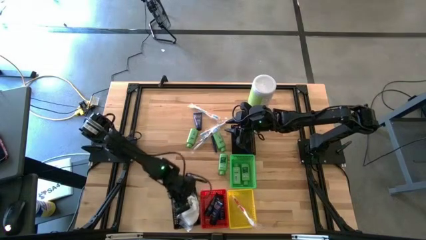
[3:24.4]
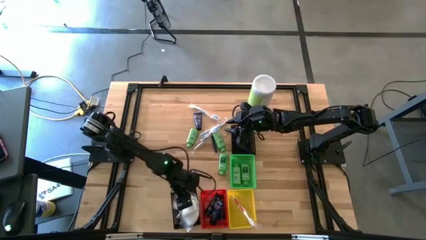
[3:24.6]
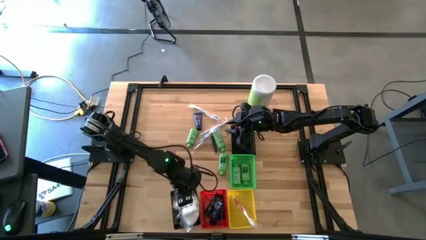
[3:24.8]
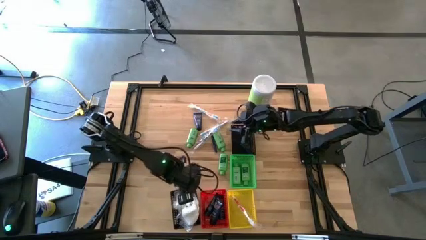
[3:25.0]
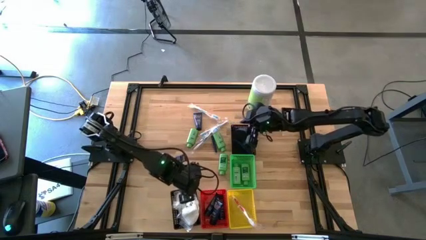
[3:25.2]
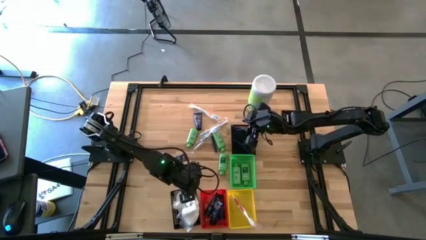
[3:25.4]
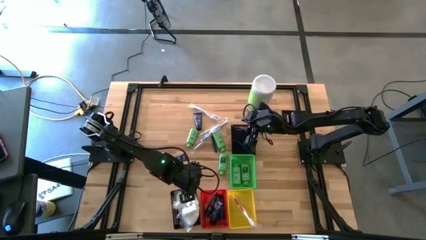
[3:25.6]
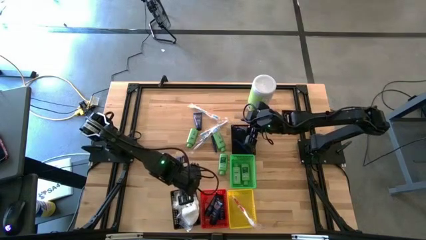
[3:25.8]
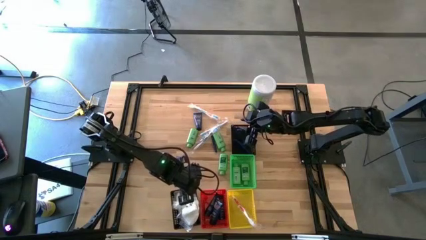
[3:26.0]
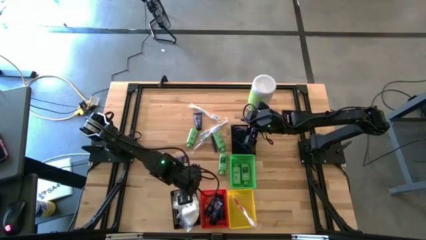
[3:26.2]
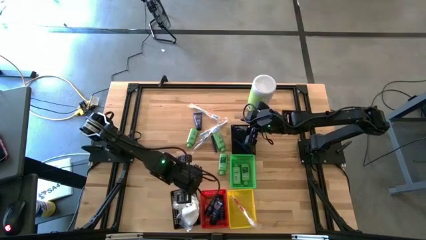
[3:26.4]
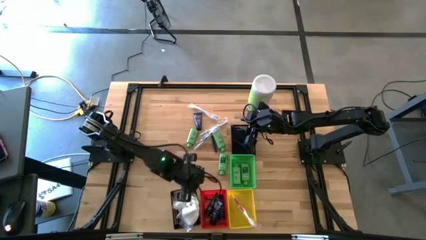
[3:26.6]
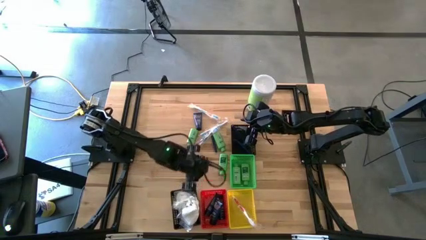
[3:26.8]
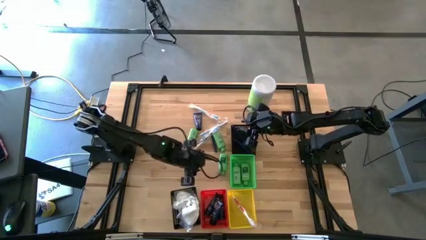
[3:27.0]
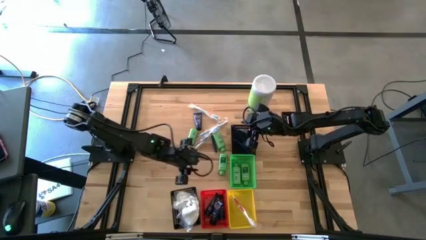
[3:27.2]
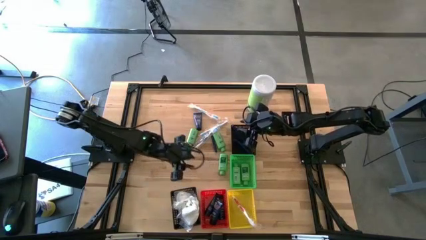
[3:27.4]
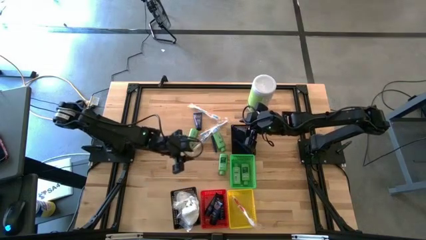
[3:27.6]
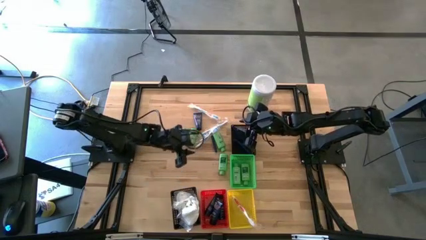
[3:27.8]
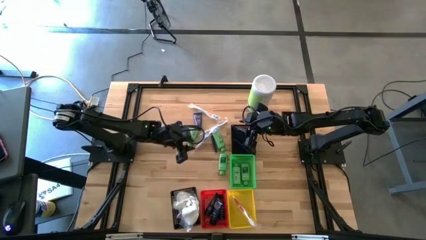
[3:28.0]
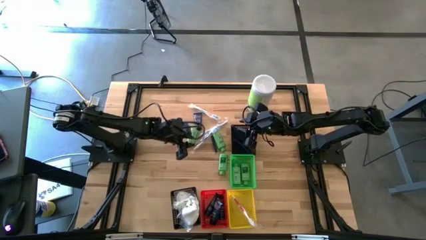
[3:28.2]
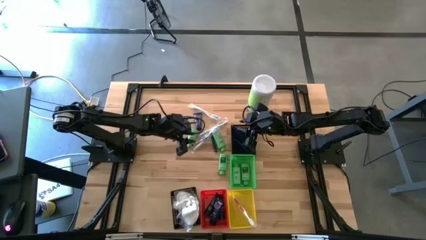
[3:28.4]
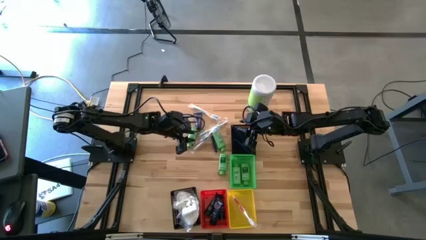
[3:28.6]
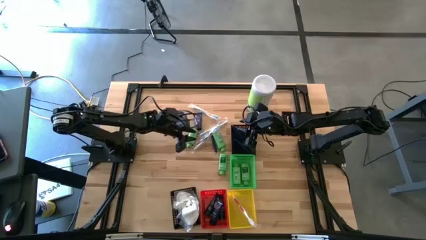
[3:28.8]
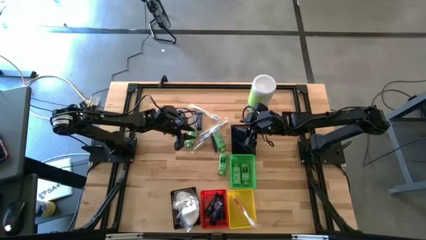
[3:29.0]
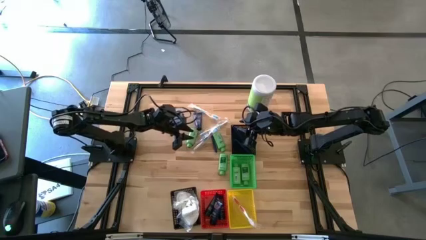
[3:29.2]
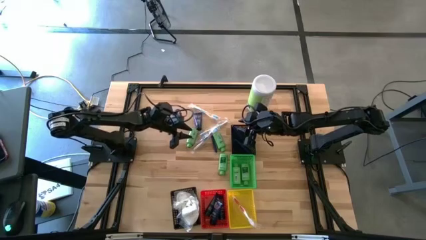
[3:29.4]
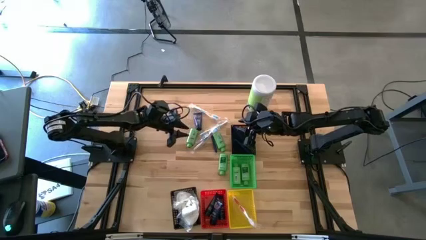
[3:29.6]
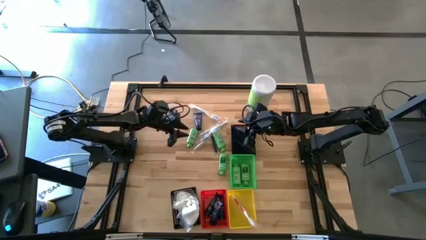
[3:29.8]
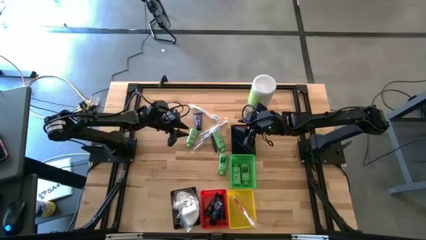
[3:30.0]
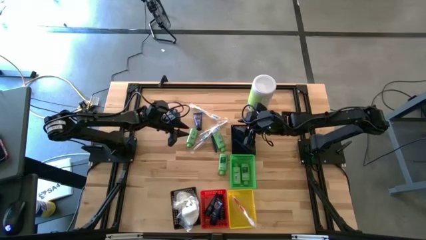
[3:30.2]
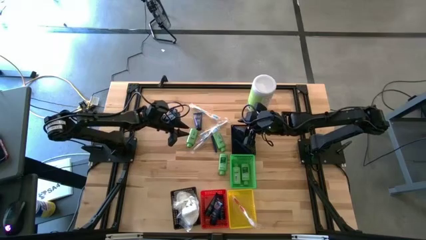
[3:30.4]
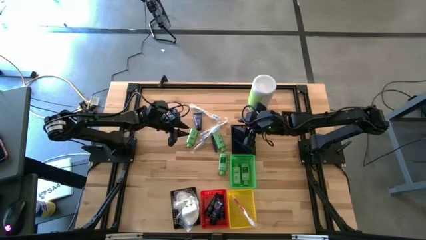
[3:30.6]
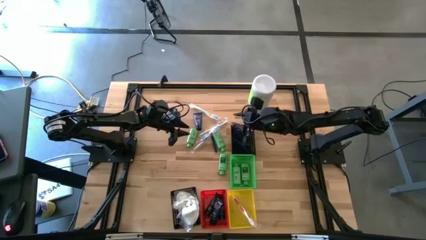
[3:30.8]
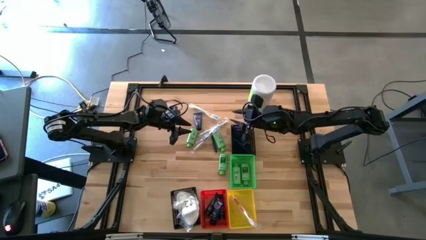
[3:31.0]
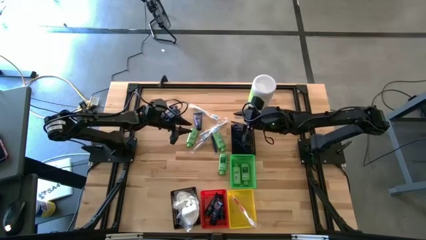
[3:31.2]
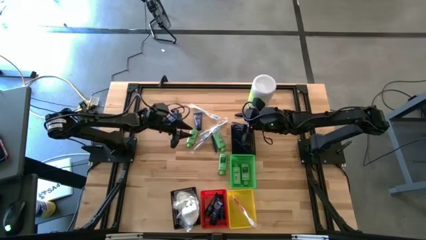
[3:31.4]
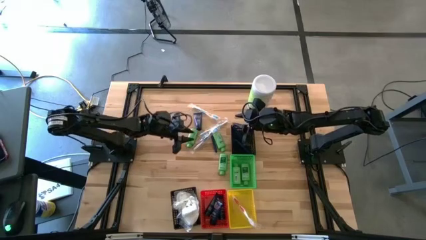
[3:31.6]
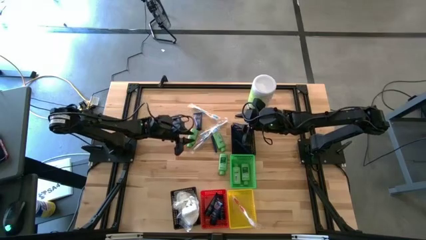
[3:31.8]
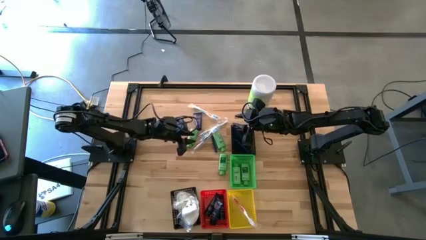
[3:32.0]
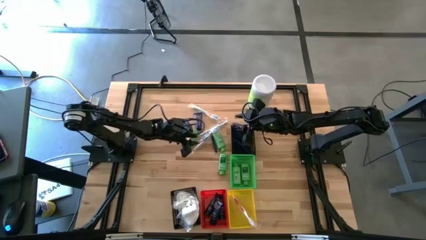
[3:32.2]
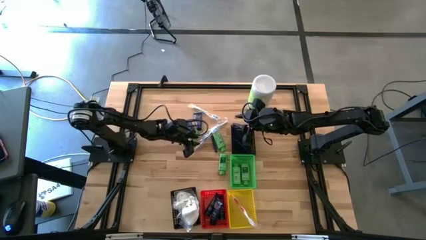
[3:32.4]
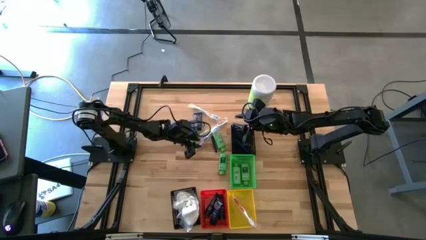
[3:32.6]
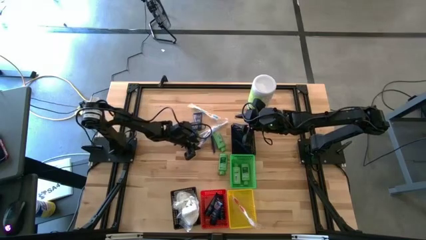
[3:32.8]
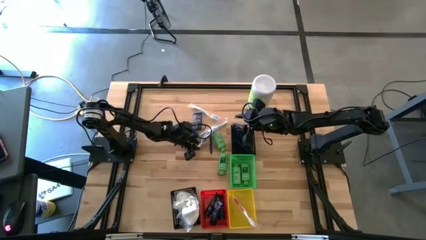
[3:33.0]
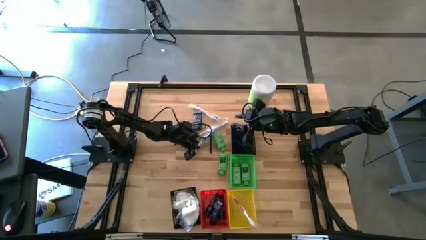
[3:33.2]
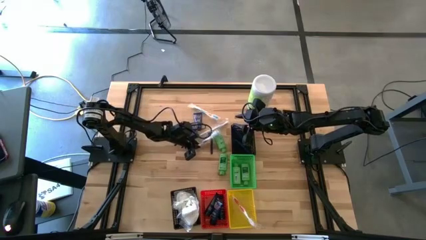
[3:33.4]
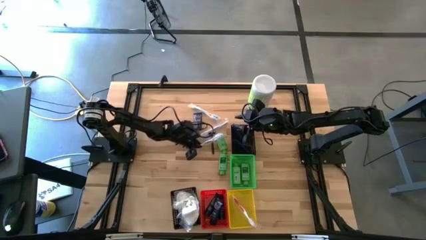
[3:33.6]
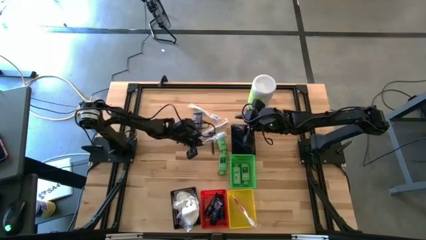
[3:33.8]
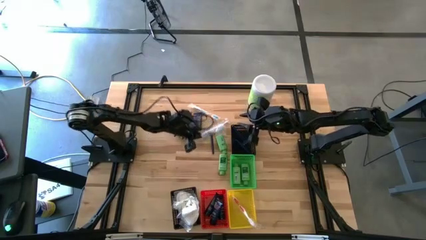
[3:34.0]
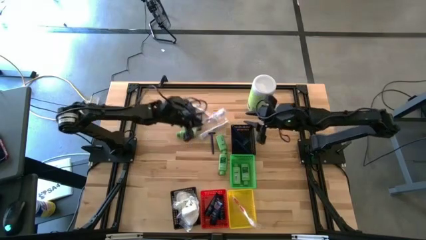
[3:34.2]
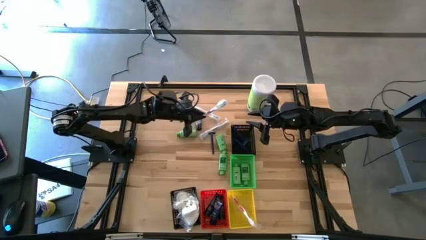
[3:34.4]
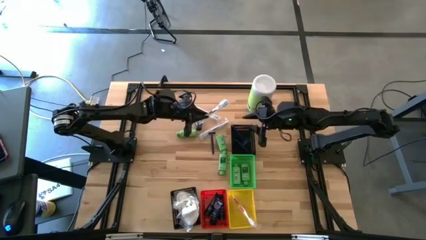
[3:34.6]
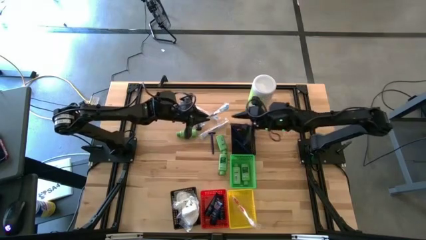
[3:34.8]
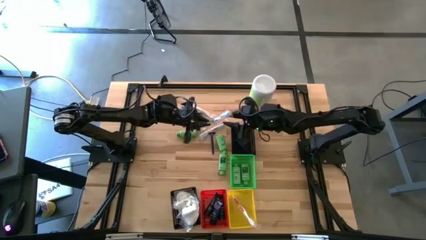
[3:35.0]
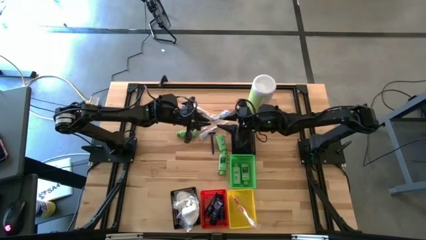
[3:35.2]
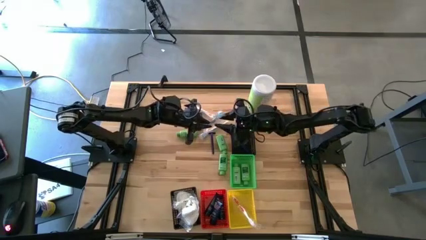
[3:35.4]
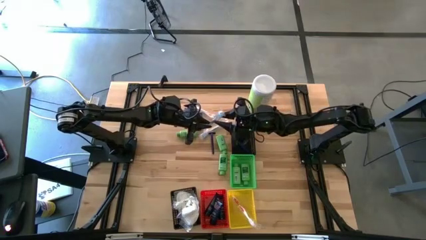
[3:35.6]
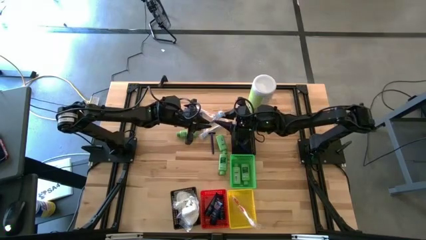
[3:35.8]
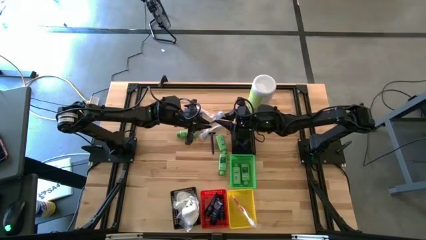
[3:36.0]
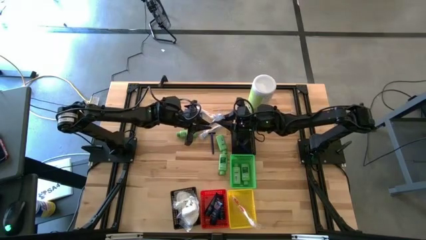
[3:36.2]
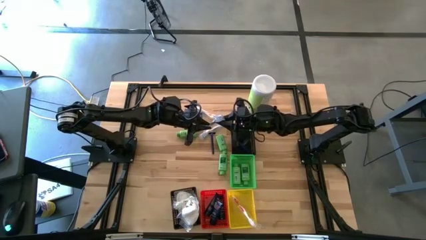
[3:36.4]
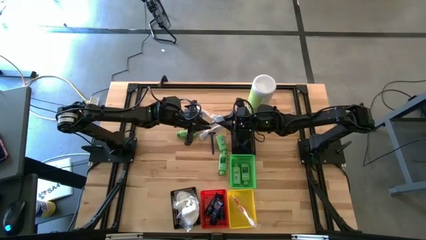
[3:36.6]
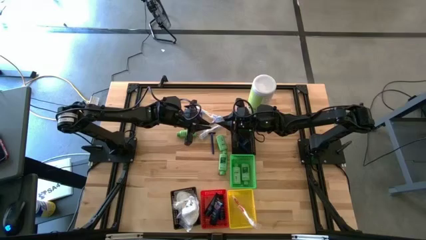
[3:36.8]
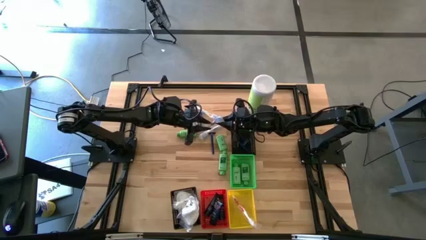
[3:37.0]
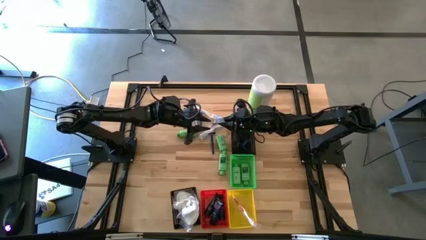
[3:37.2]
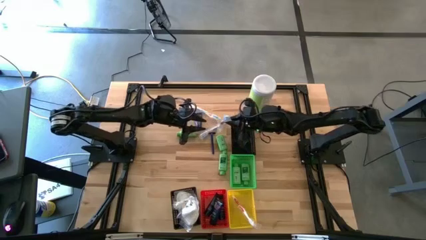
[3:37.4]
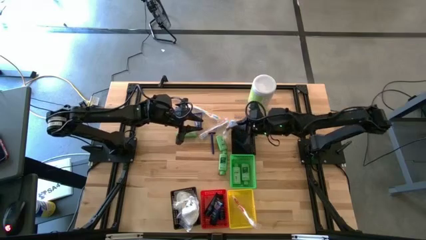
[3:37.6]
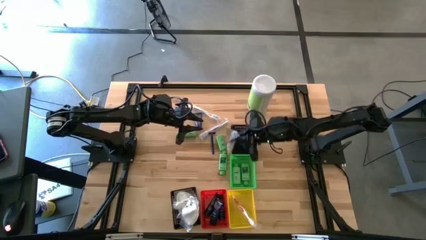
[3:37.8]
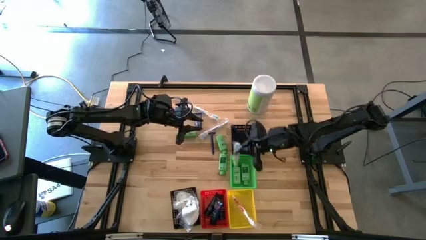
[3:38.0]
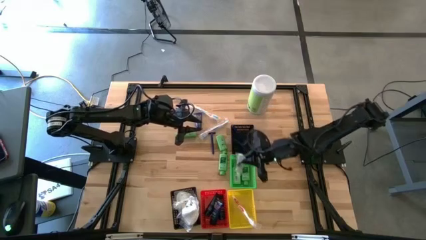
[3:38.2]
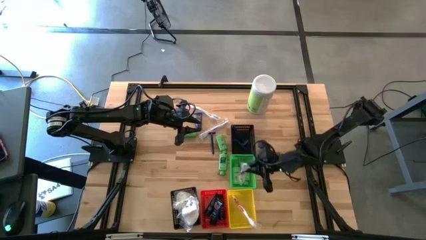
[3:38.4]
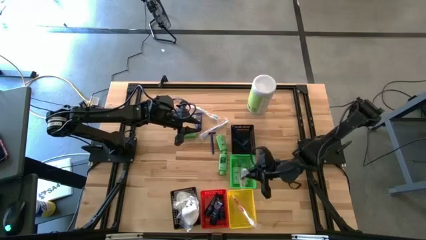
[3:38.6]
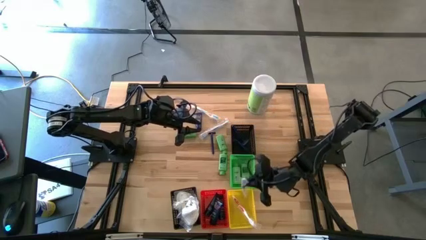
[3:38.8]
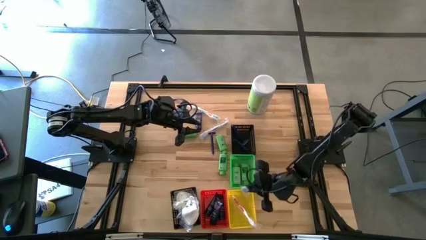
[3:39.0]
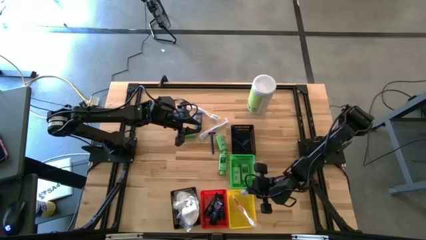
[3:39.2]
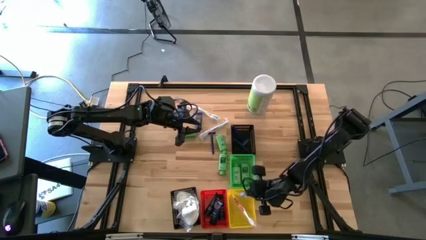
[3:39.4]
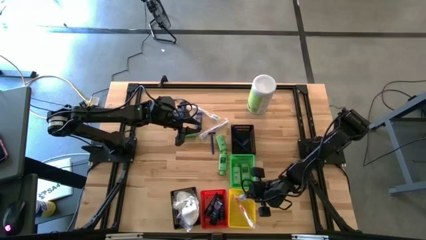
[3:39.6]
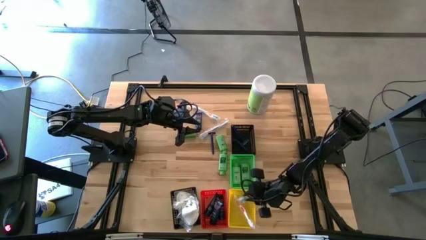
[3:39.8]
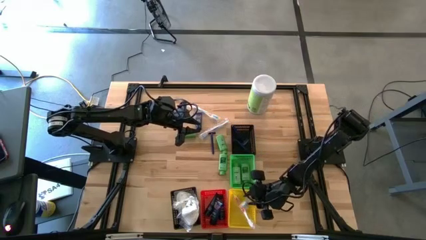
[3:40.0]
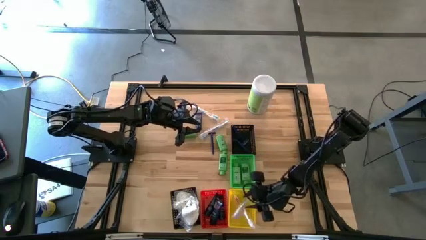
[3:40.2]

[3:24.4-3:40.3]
Task: Pick & Place Travel size toiletries
Put the blue toothbrush into the yellow bin

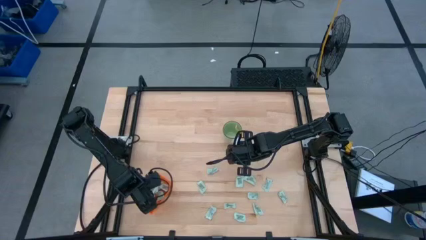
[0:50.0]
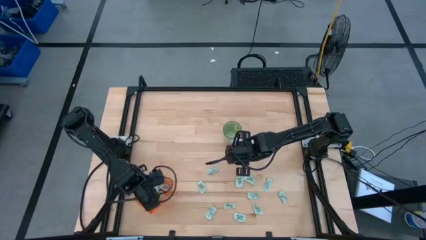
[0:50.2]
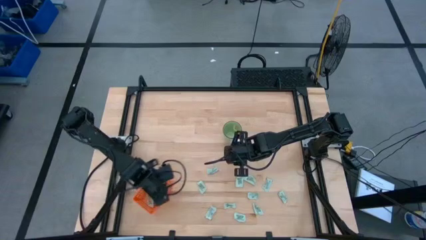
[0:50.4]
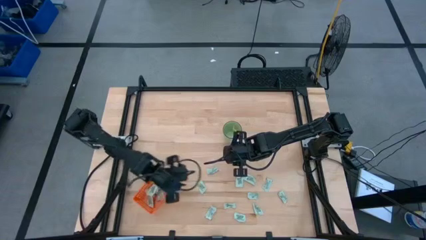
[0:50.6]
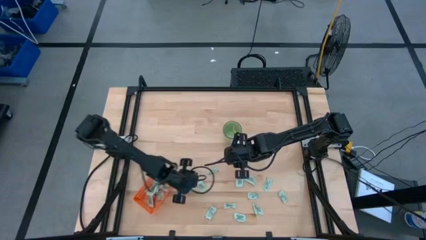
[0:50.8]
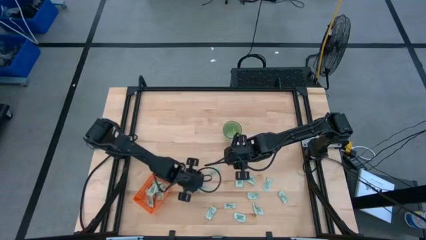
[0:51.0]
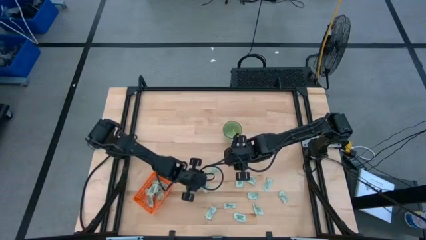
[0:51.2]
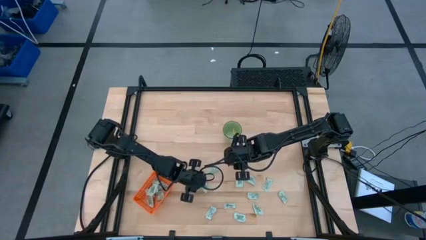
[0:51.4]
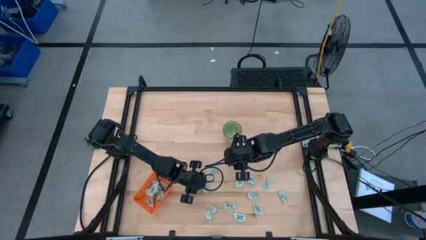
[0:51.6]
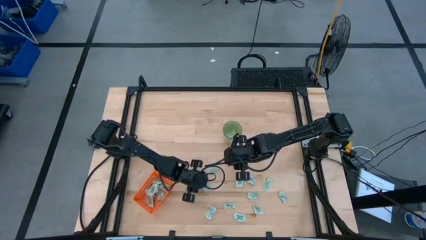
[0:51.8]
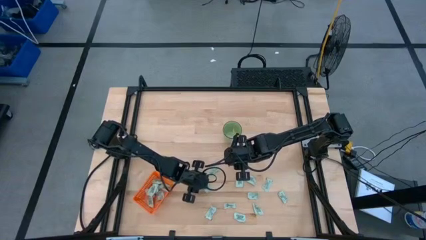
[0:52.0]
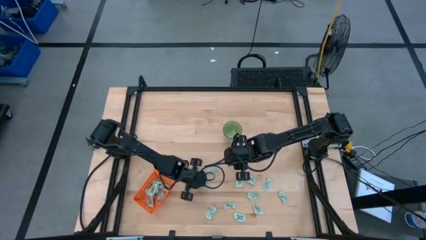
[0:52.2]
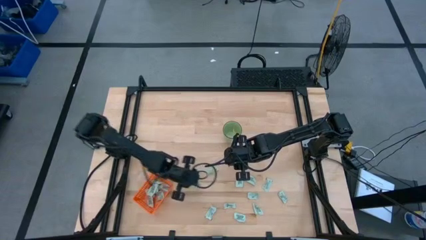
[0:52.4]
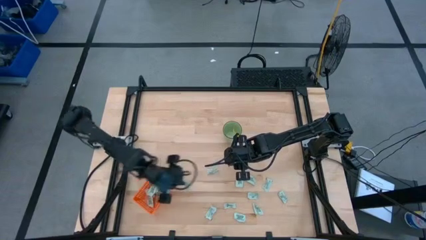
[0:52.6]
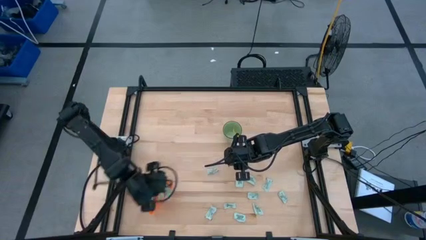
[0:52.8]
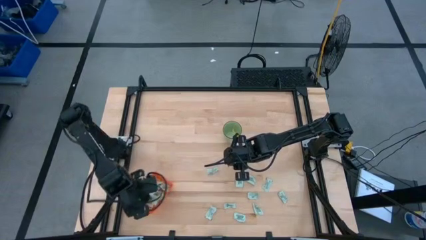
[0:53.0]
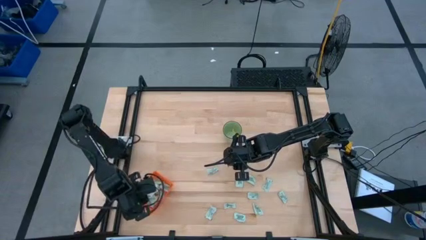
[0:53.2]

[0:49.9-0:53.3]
Task: Pick and place Stevia / Truvia into bins
Put the light green stevia packet into the orange basket
